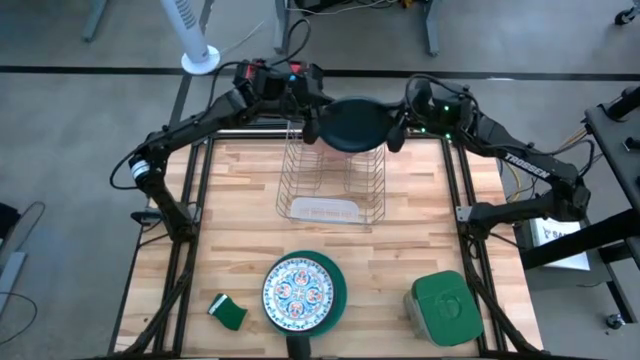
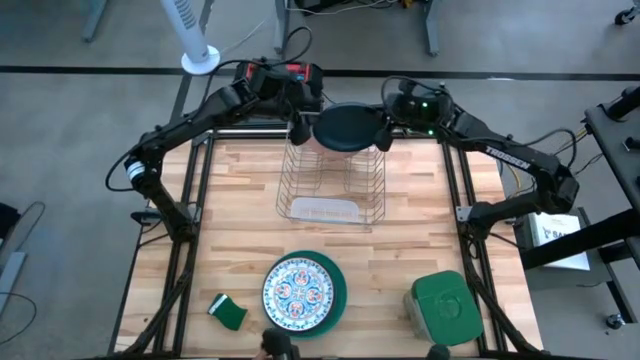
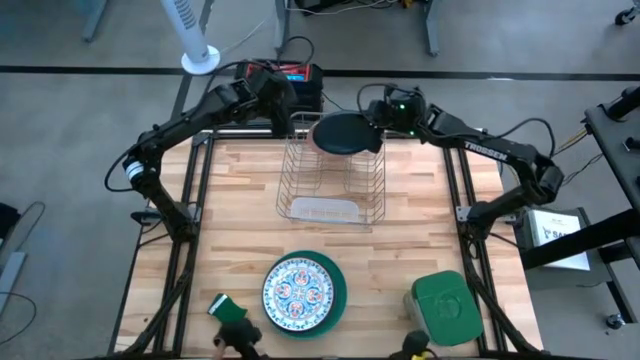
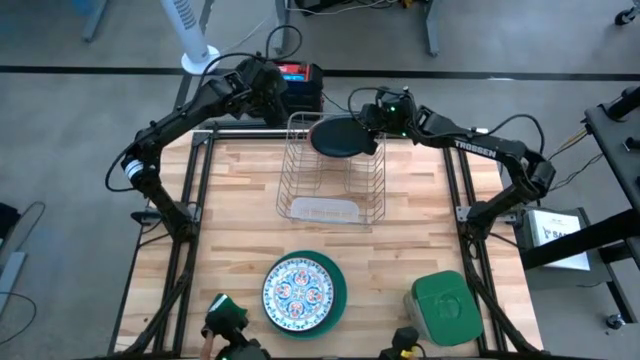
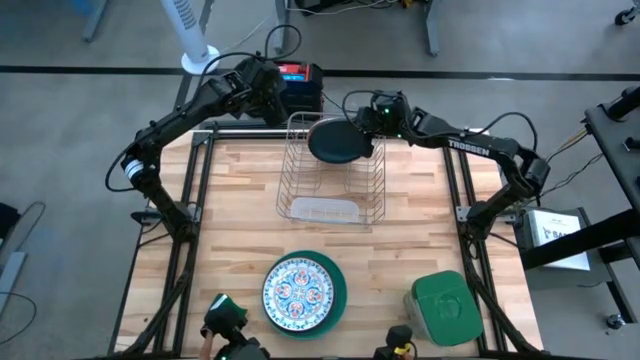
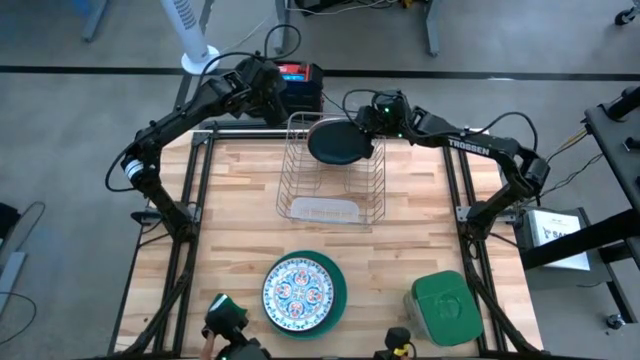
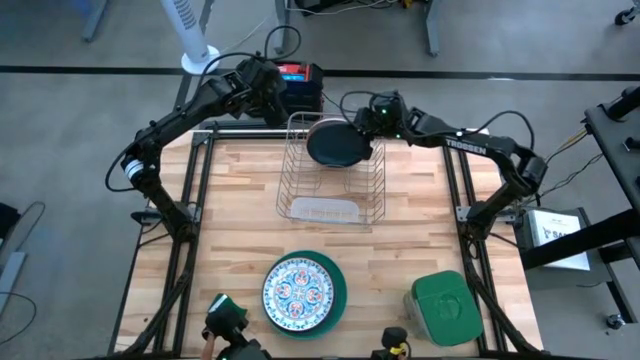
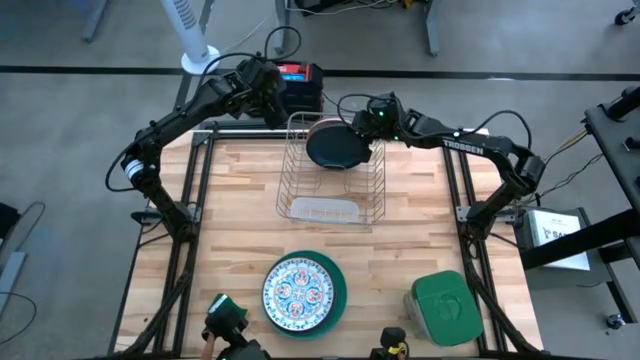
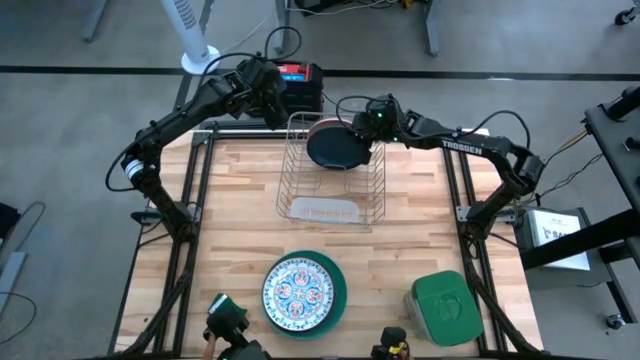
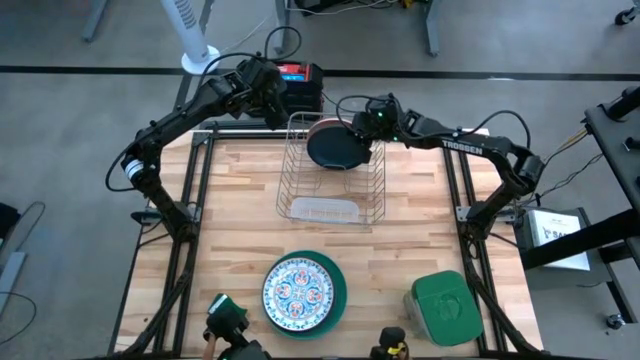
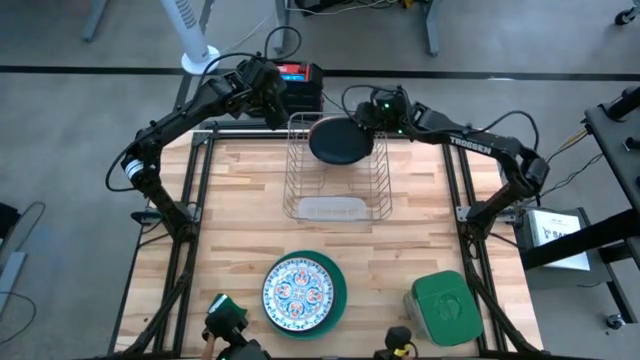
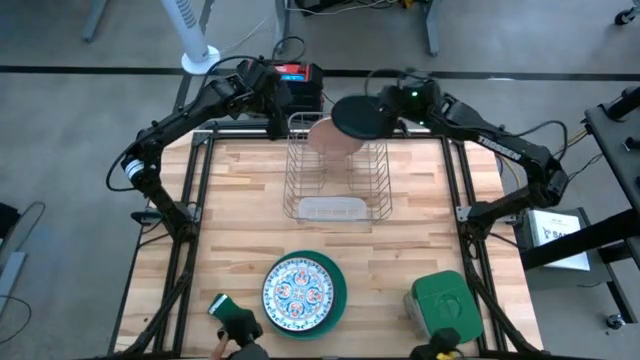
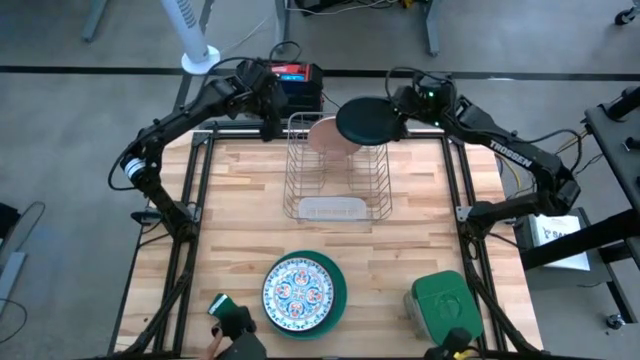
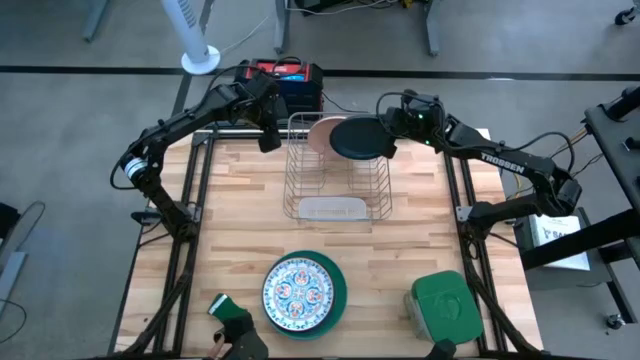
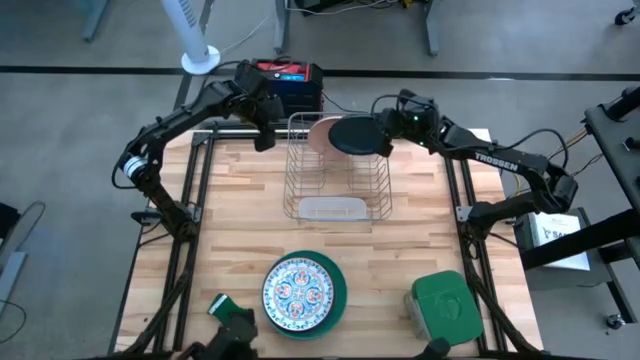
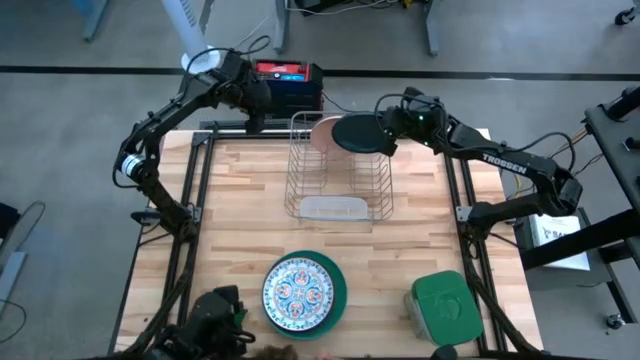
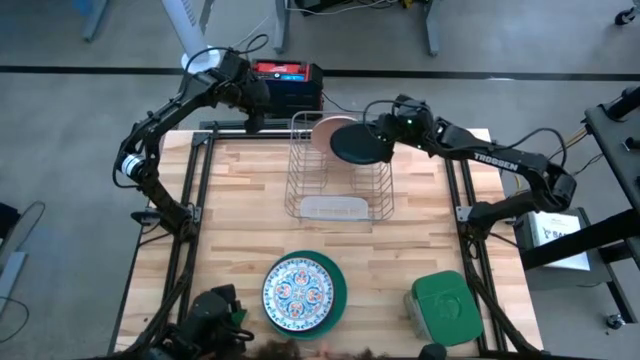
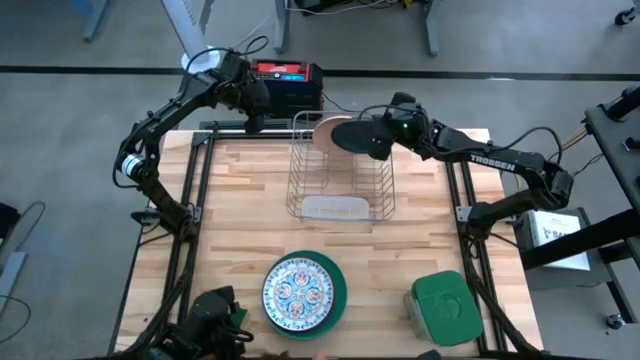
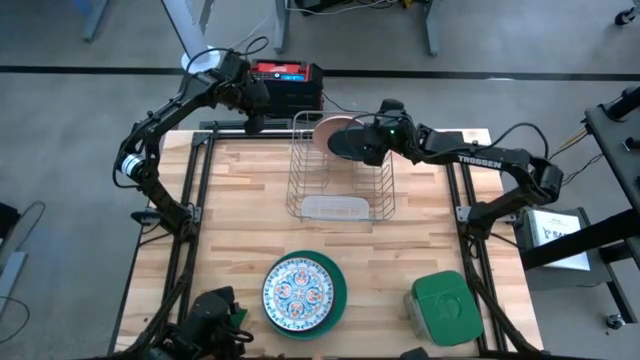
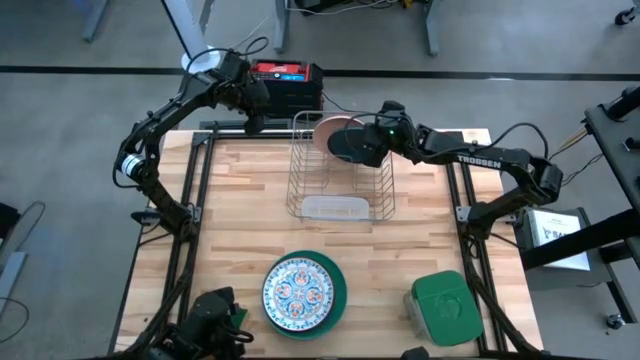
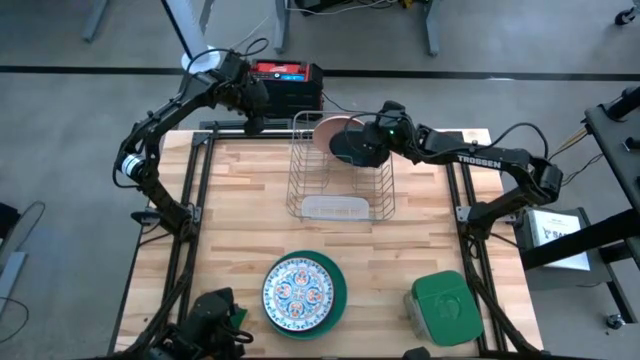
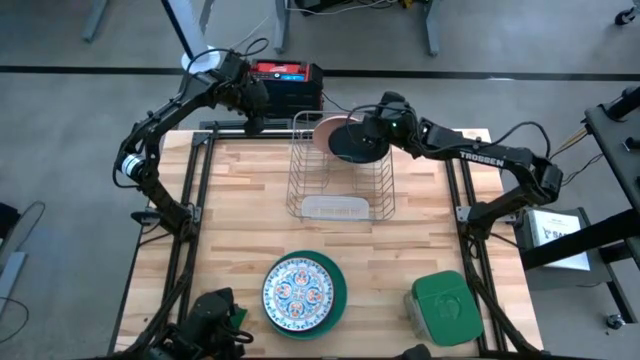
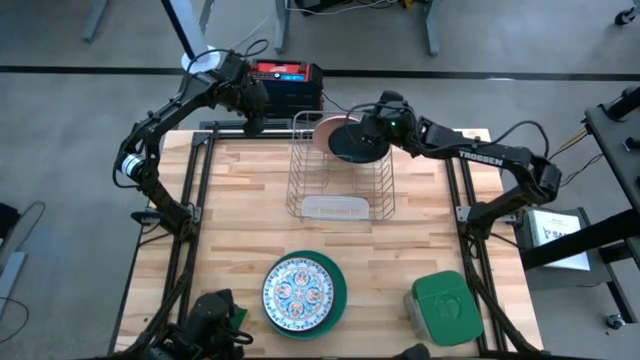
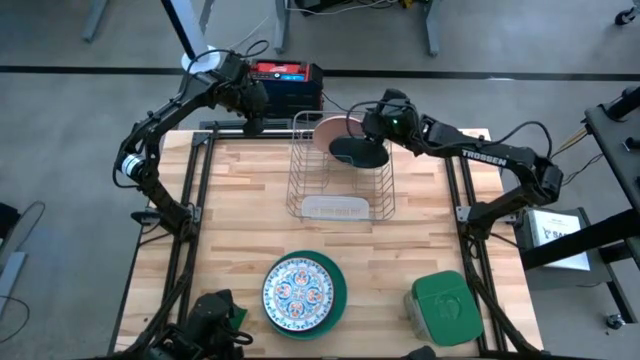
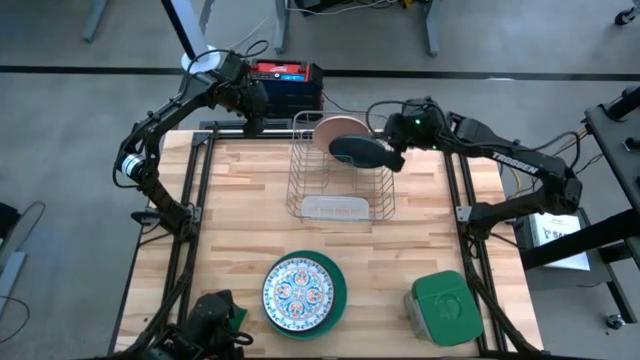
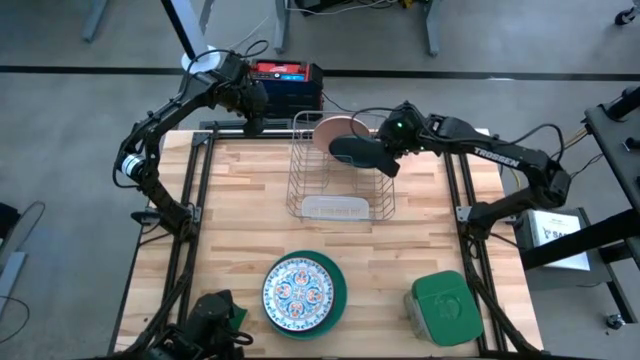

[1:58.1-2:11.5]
Task: Sort dishes
Put the dark green plate in the dishwasher rack

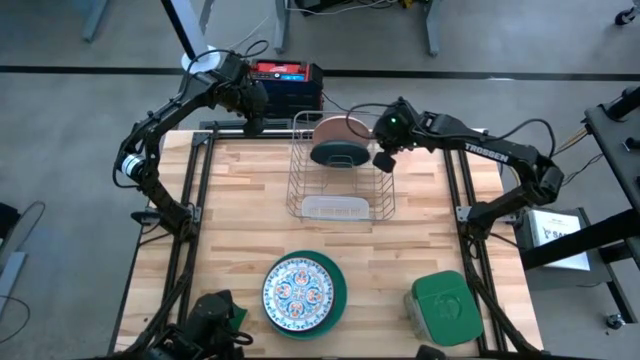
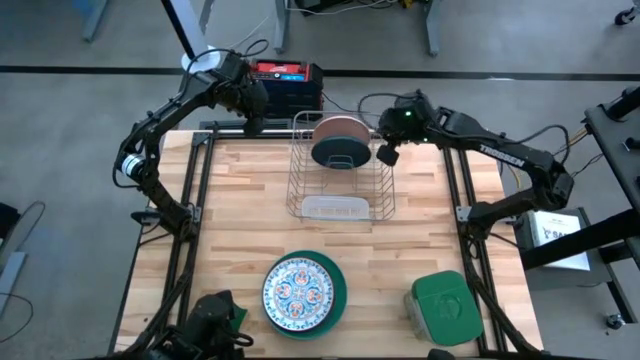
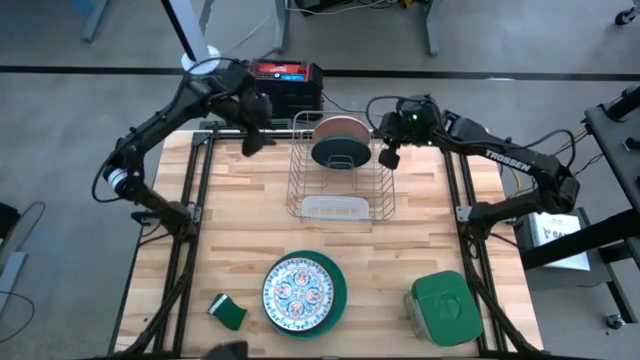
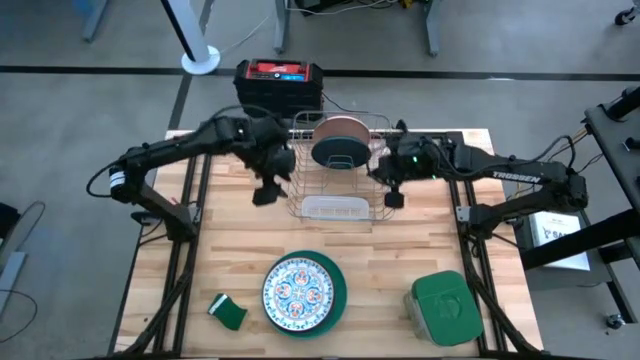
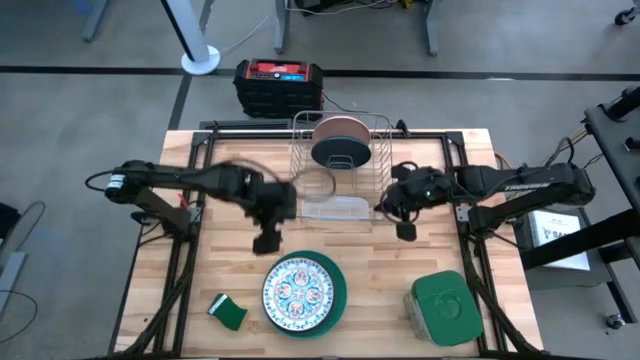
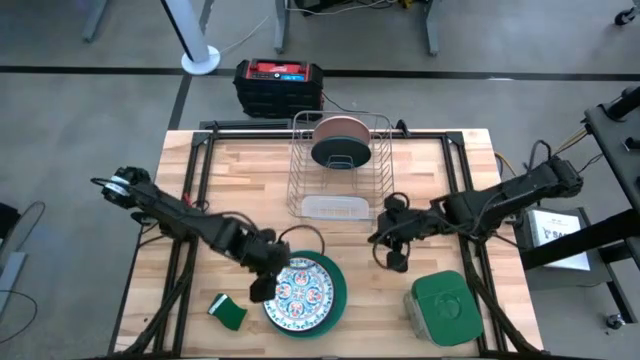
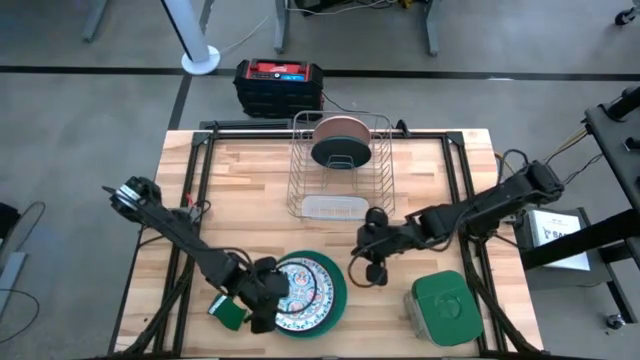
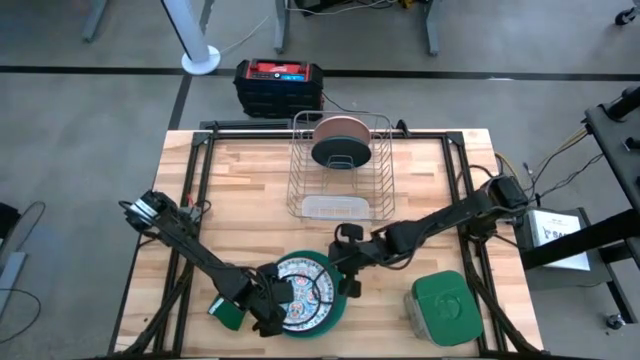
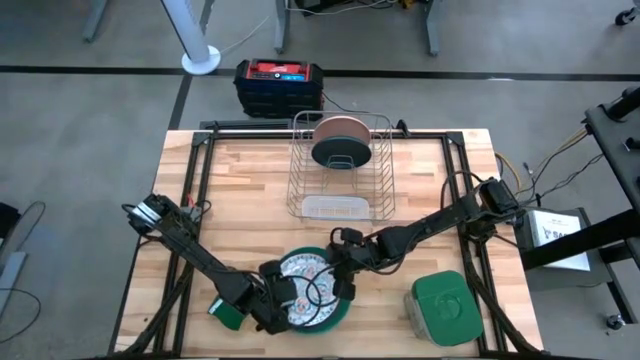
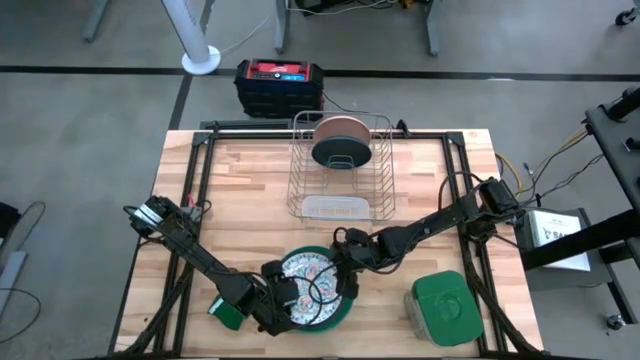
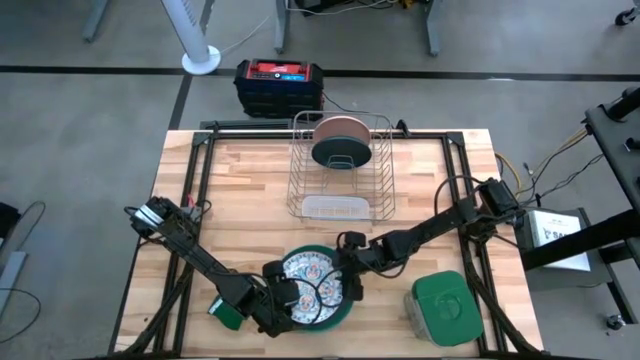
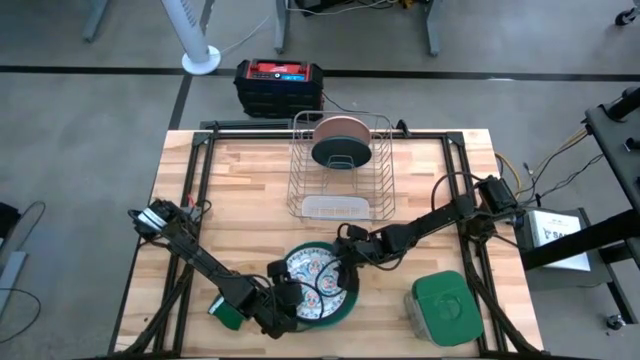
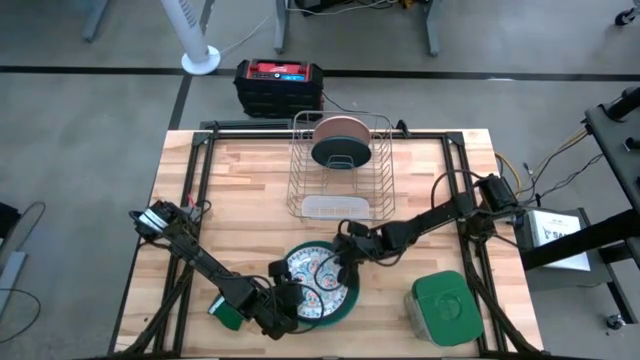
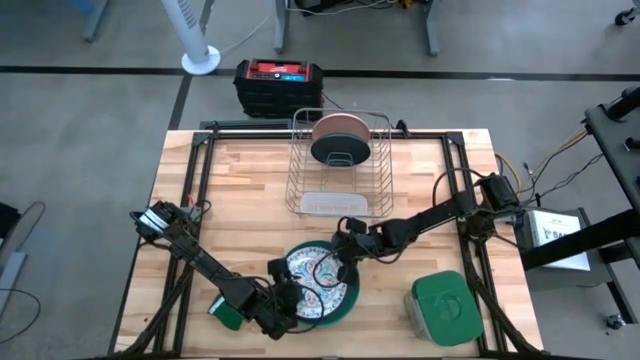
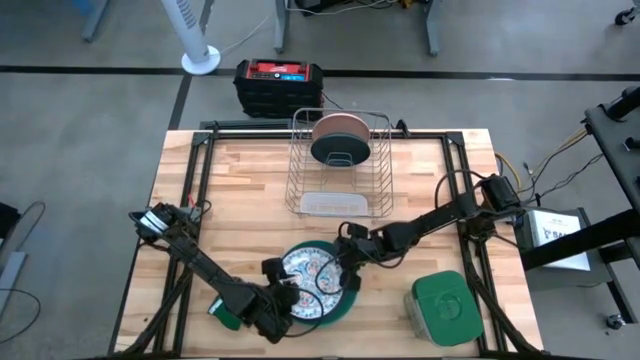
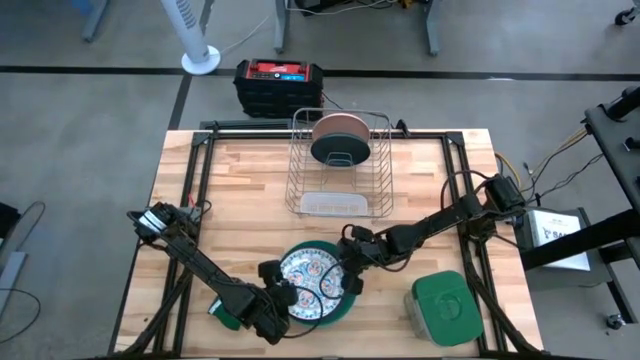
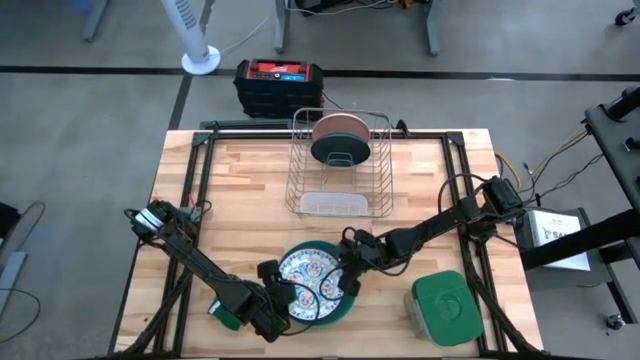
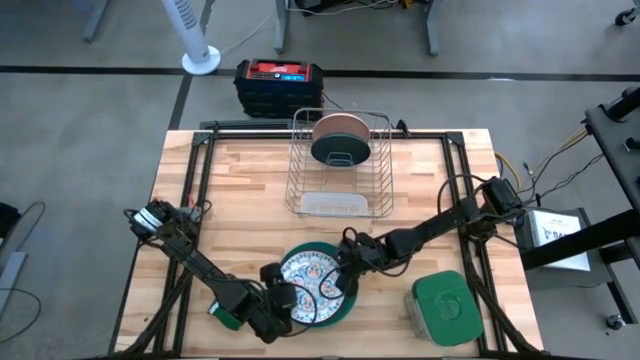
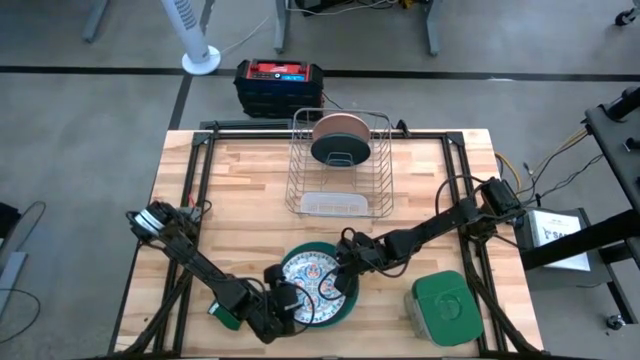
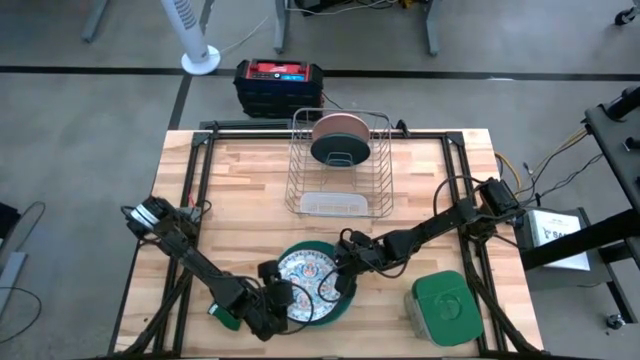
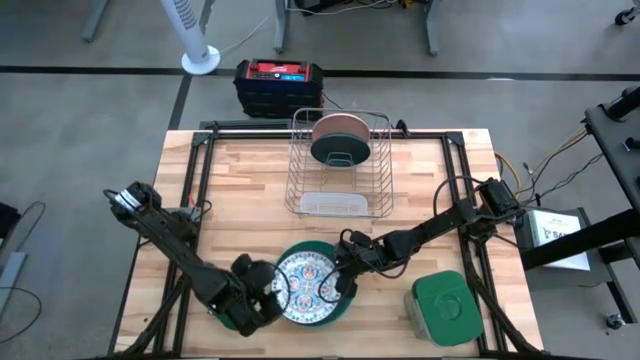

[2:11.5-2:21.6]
Put the white patterned plate in the dishwasher rack
